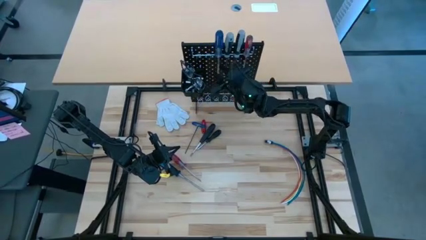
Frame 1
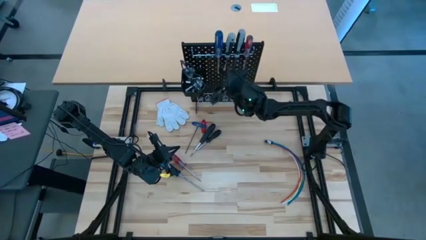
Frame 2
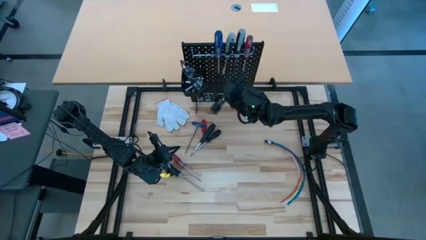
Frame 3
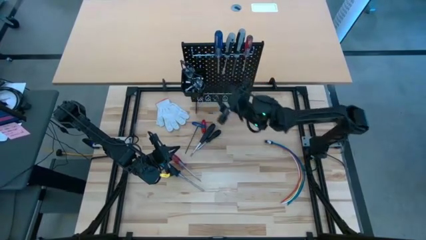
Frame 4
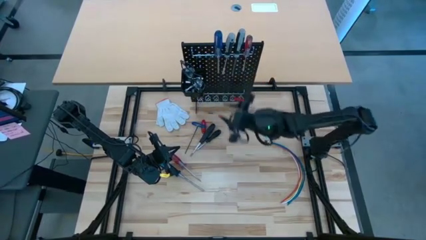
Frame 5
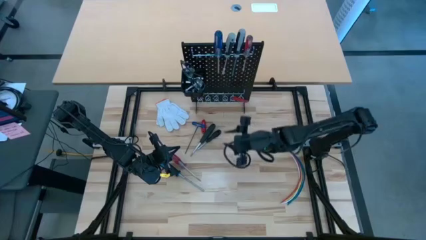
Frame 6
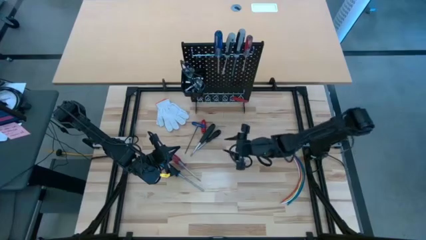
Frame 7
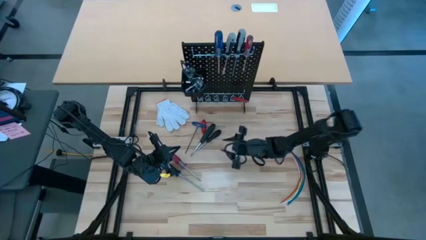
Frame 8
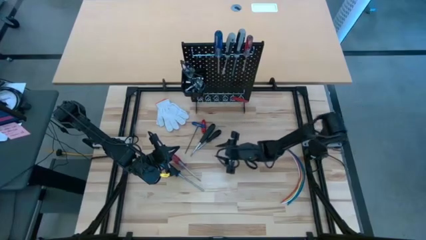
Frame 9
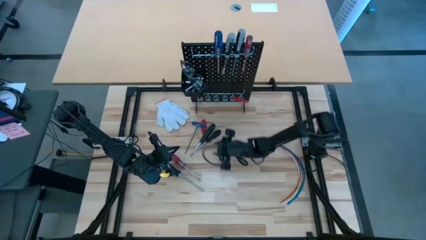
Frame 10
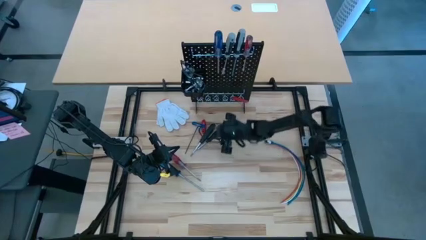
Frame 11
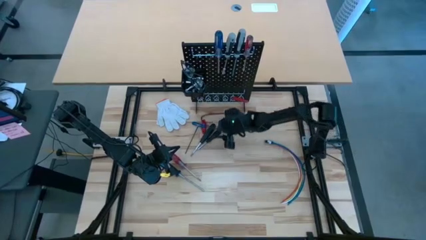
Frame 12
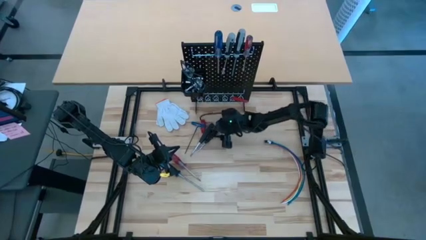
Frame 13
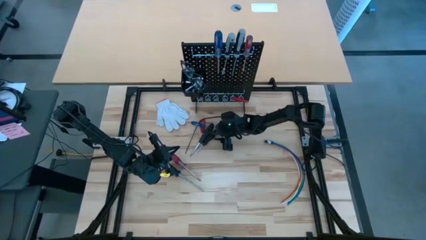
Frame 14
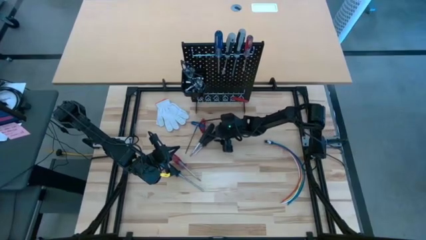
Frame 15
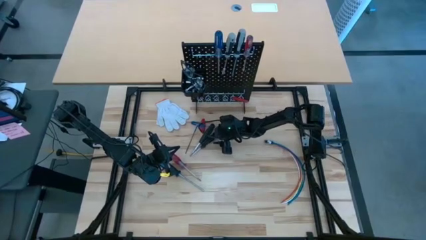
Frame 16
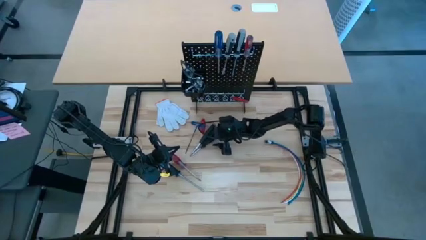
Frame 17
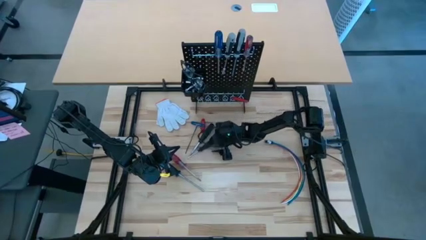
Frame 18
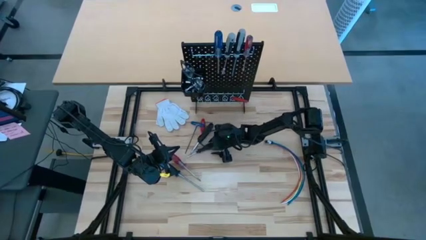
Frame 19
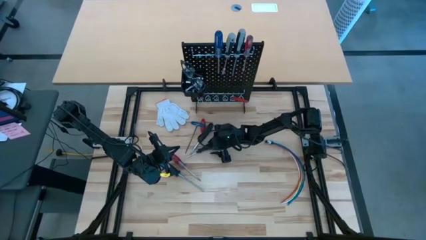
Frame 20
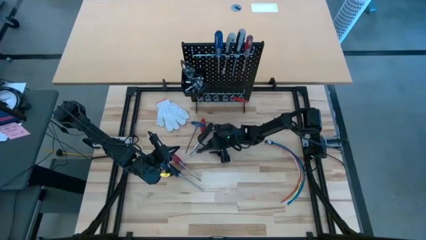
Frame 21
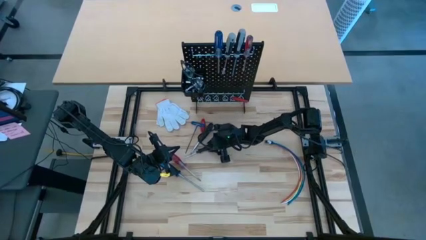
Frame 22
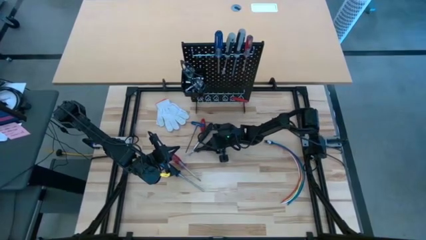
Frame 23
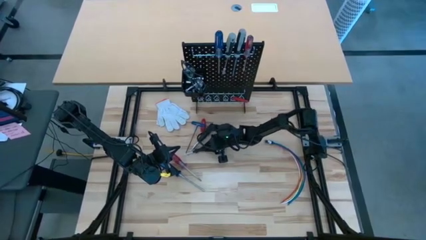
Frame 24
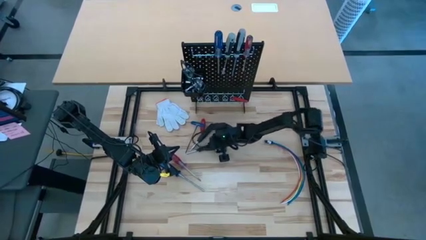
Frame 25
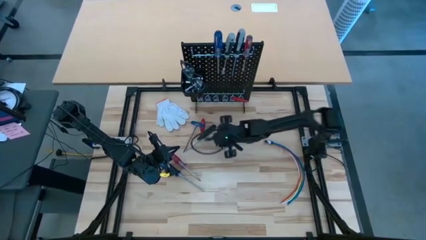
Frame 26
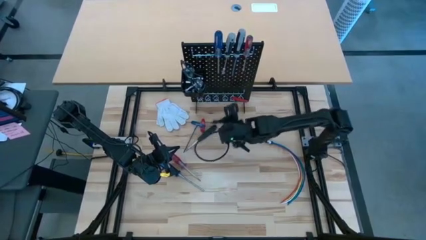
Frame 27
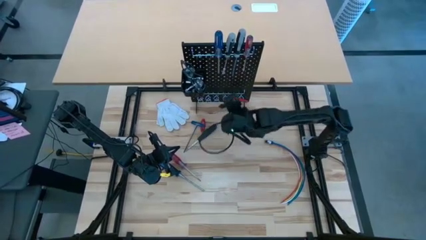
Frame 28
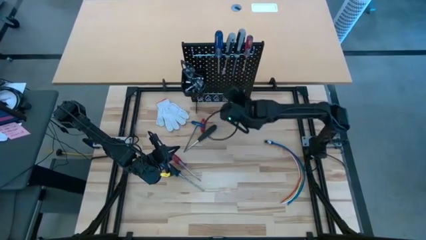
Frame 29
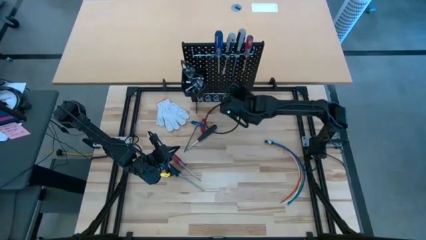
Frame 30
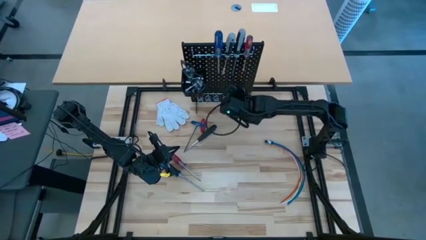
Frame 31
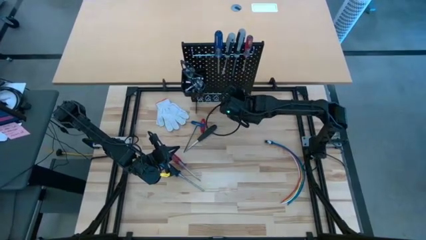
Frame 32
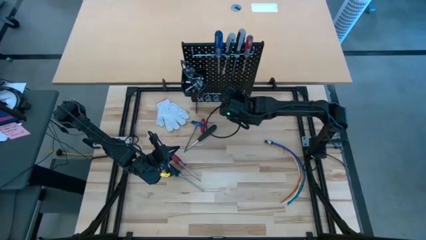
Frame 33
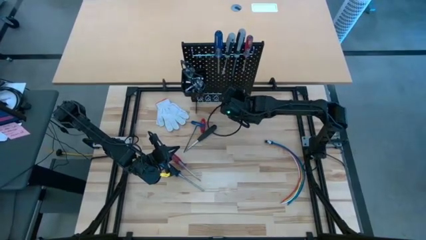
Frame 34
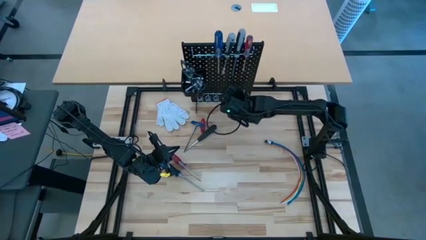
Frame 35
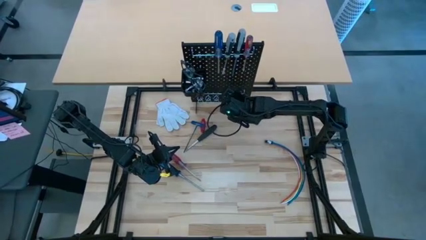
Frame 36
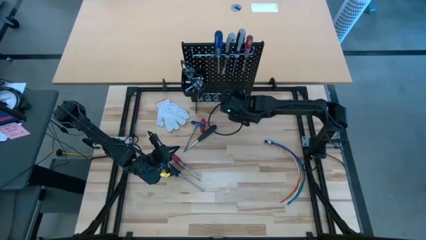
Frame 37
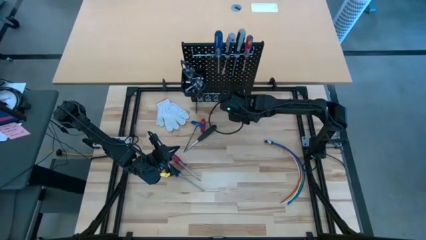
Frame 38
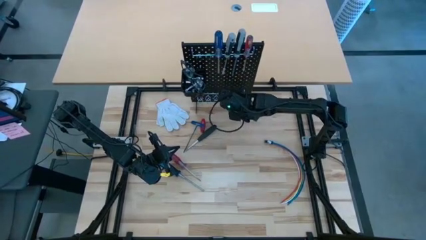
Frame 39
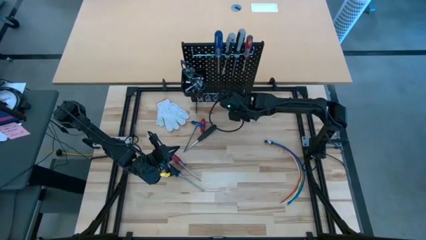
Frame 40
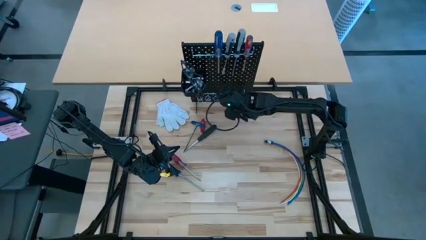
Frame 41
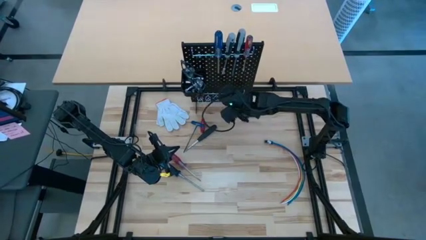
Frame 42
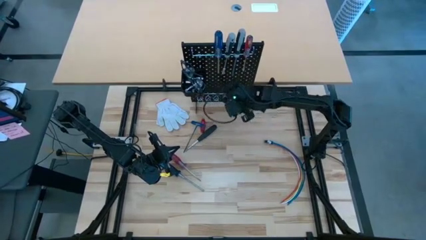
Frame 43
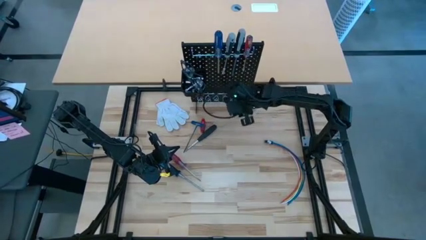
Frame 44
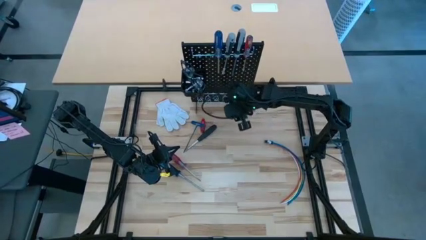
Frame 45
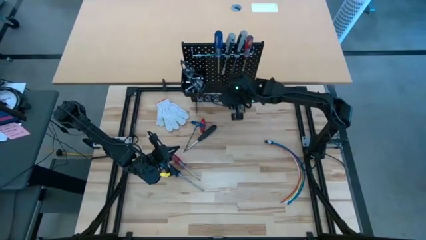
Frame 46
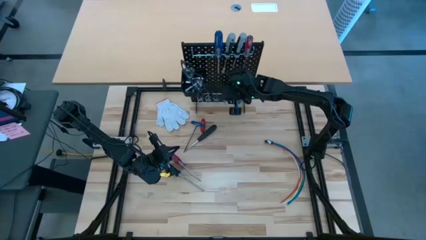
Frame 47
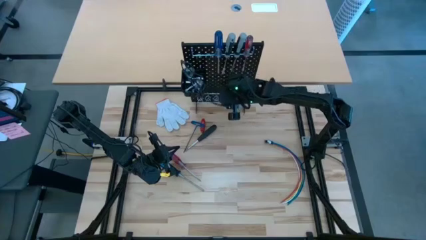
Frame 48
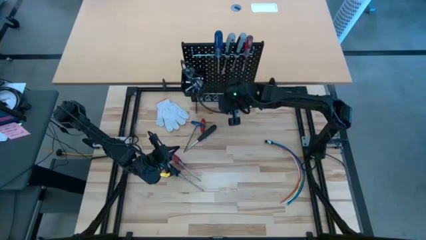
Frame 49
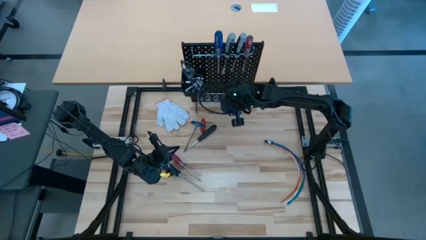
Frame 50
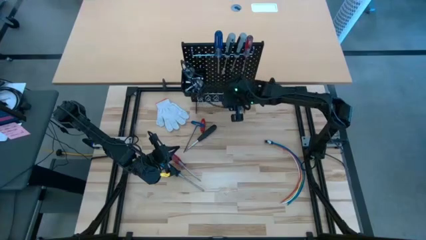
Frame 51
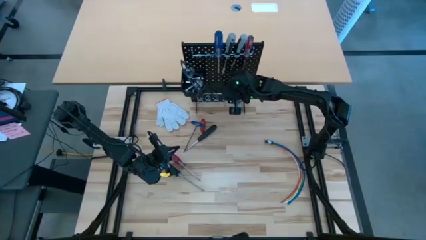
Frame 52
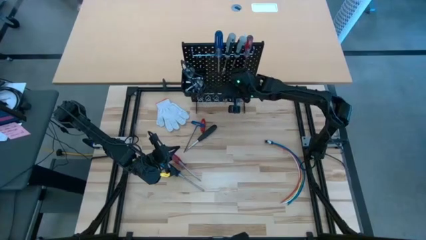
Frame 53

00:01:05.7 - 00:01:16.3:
Task: Hang tools onto peg board
Hang the right black screwdriver in the peg board

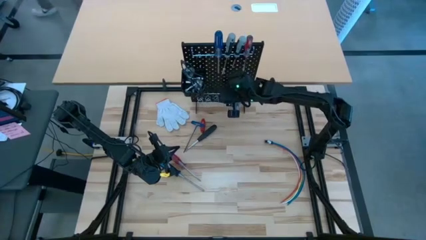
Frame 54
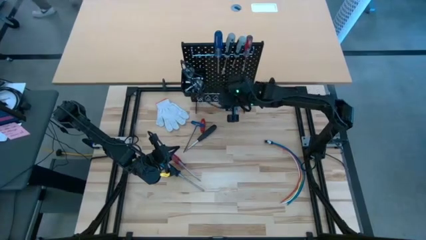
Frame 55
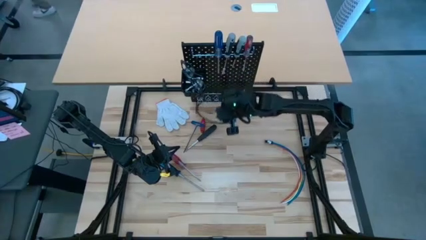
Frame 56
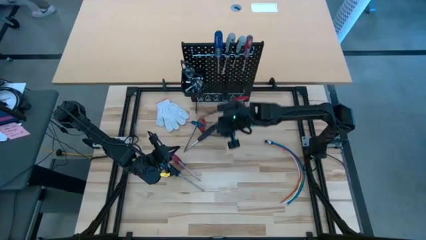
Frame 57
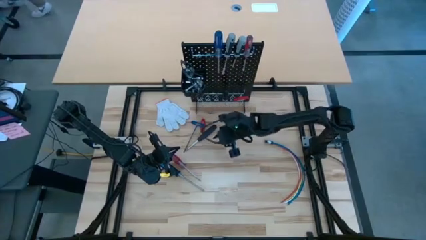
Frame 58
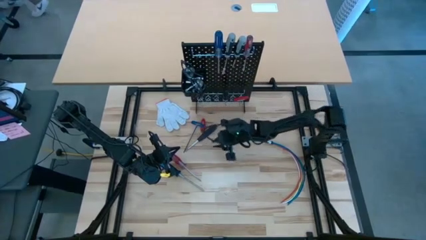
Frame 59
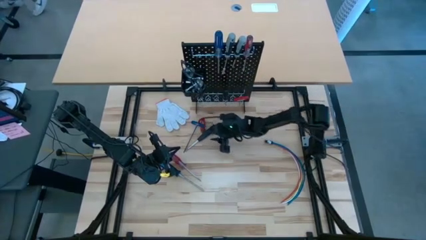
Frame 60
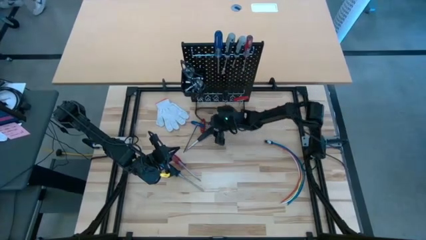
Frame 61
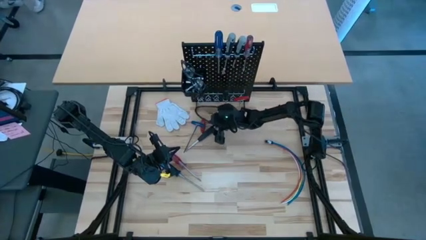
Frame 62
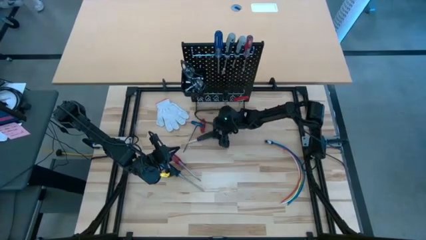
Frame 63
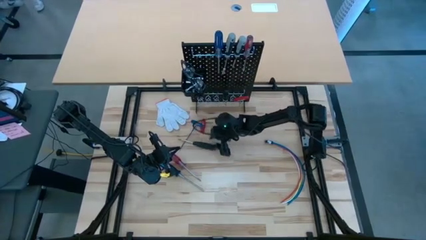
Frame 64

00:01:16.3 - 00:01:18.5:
Move the black screwdriver to the bottom

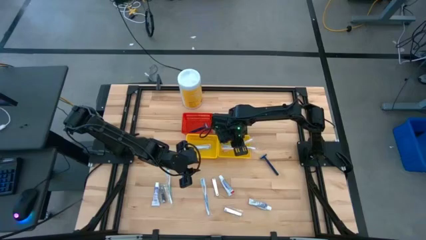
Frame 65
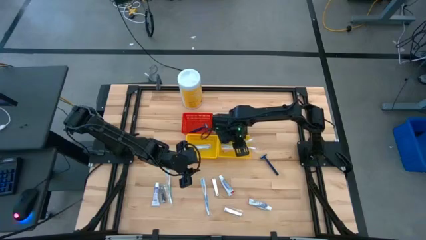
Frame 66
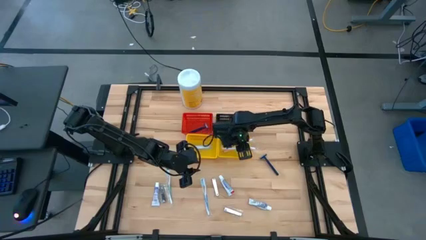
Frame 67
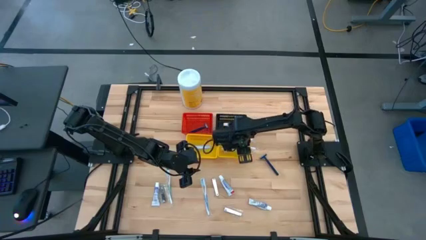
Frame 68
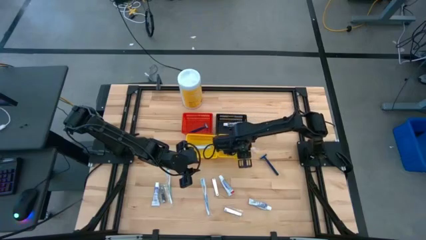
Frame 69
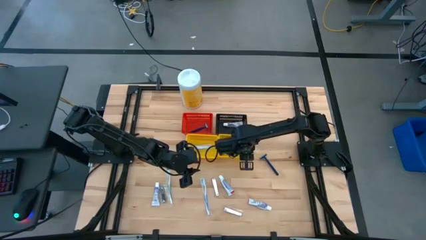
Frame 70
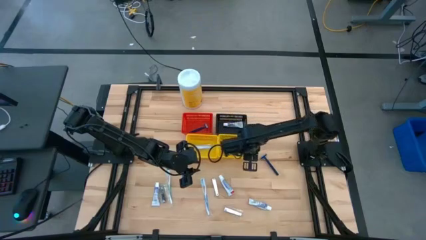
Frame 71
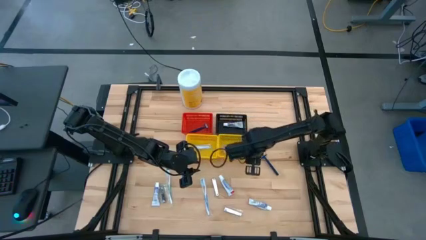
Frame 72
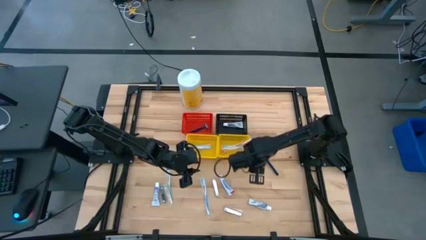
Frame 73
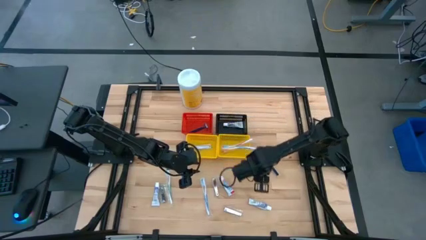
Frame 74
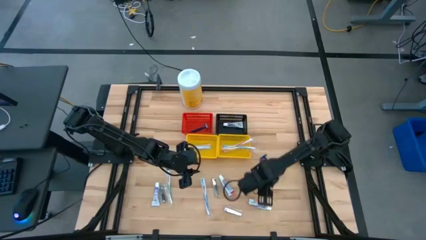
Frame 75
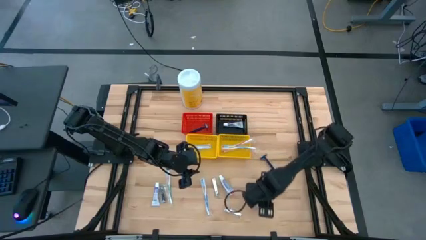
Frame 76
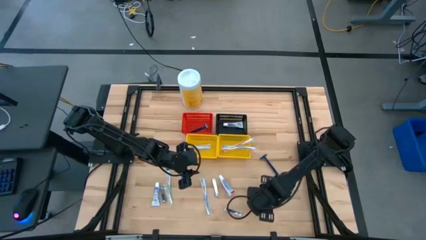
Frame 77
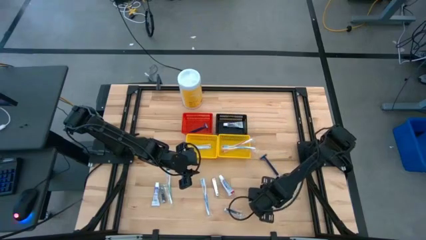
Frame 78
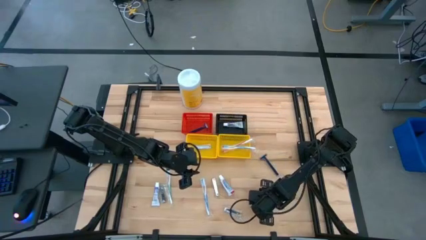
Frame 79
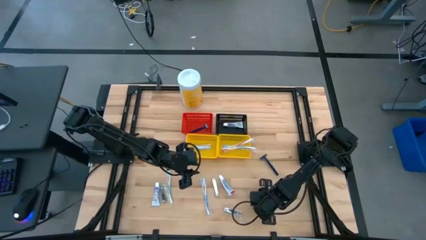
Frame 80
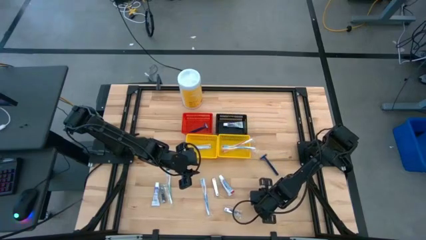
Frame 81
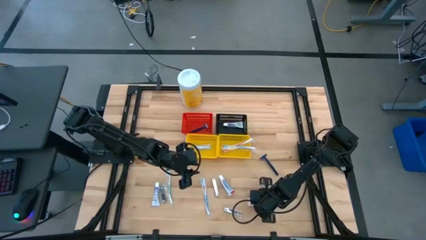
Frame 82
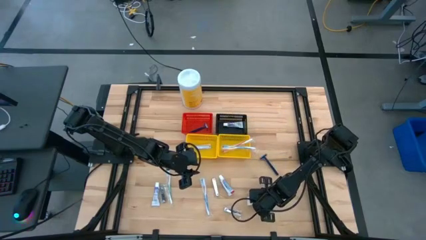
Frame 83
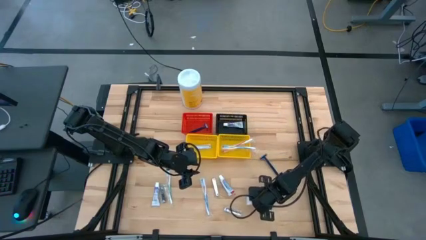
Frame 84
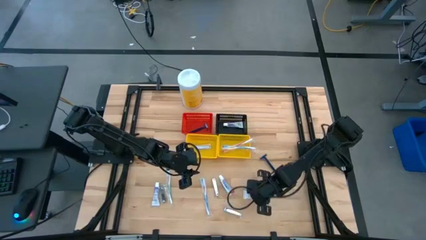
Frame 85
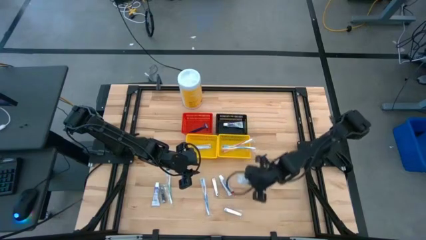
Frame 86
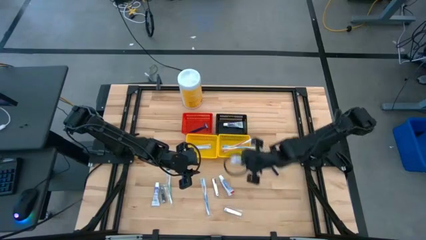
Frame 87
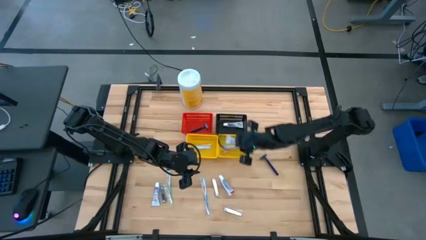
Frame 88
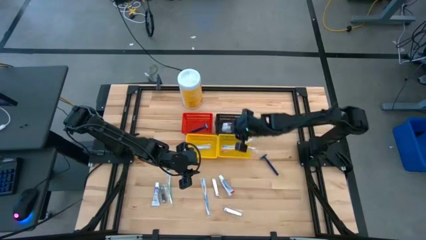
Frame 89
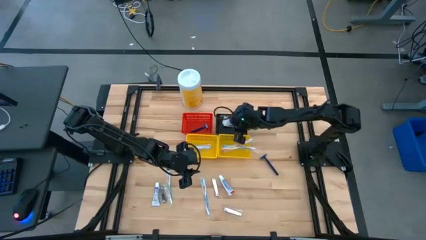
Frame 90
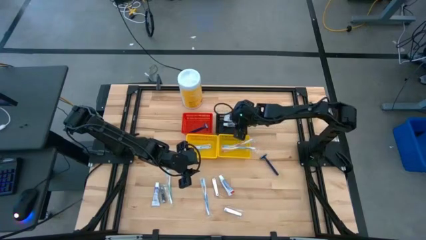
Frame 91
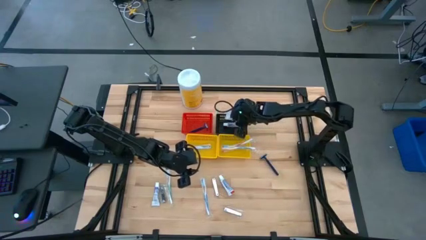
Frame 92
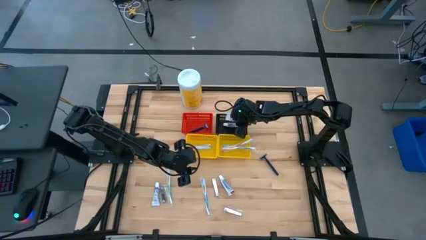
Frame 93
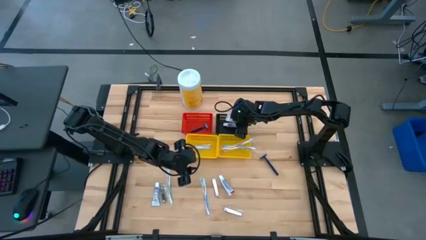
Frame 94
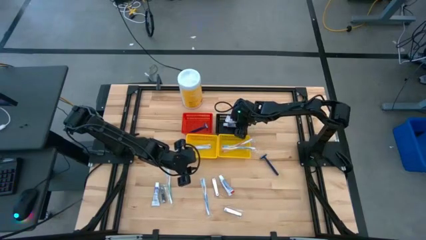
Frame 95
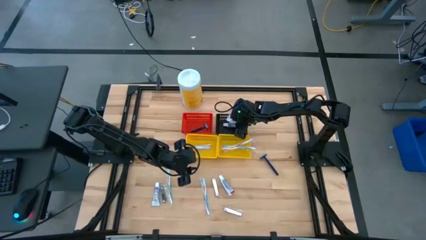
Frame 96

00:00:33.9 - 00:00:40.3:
Task: Pick & Place Travel size toiletries
Put the white toothpaste into the black bin
